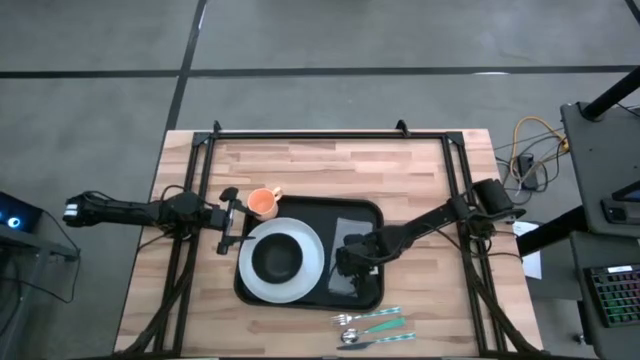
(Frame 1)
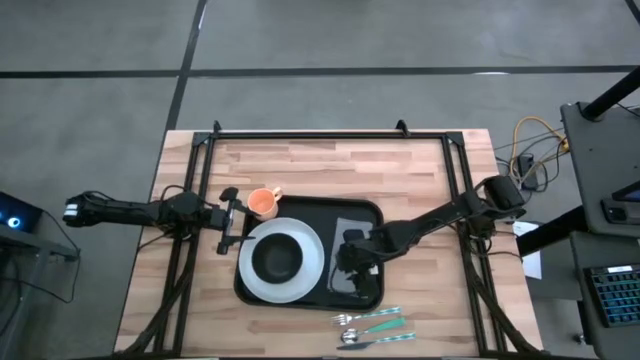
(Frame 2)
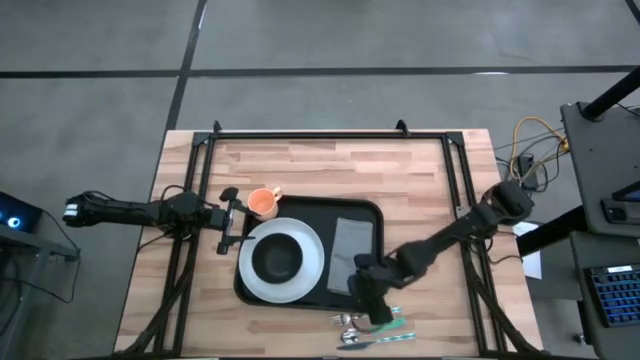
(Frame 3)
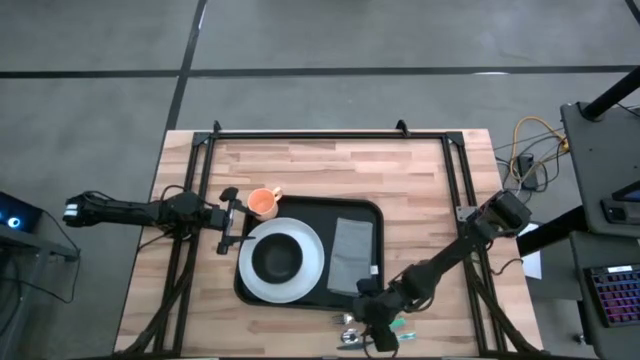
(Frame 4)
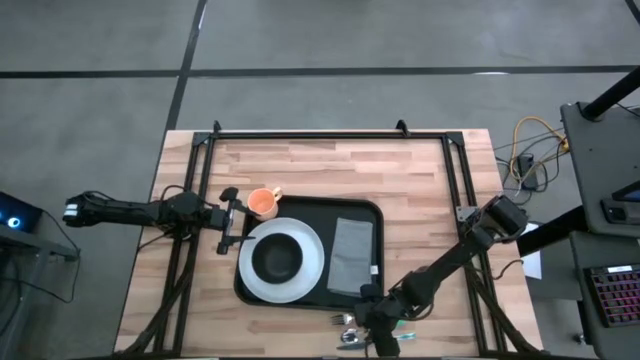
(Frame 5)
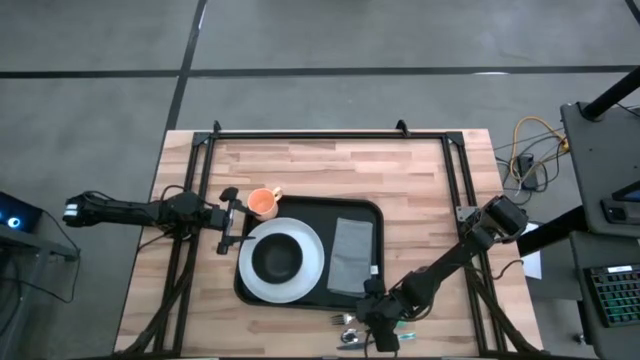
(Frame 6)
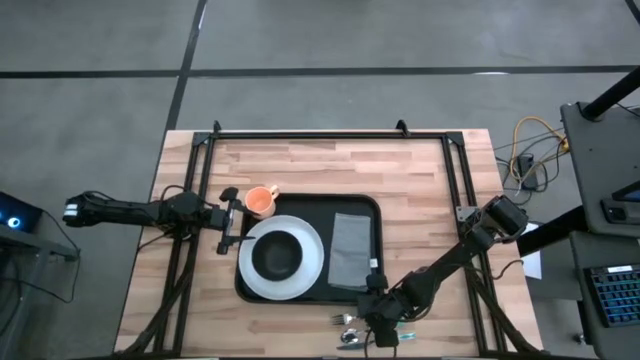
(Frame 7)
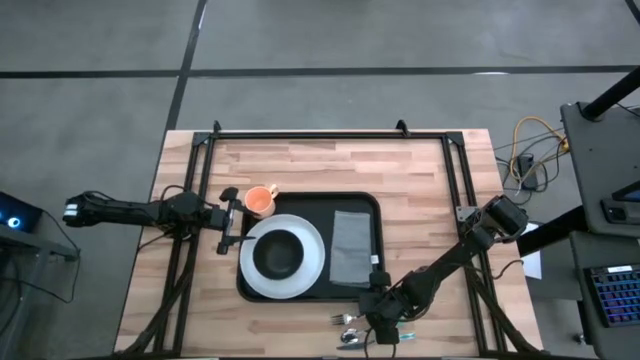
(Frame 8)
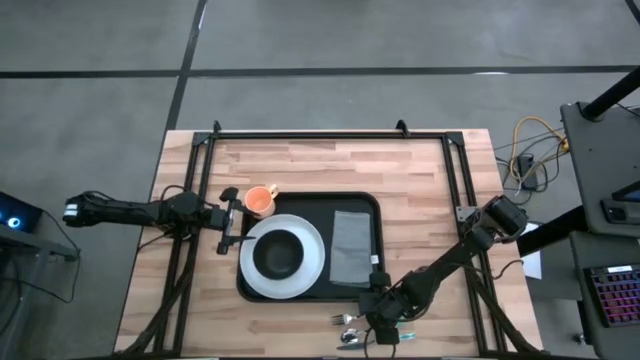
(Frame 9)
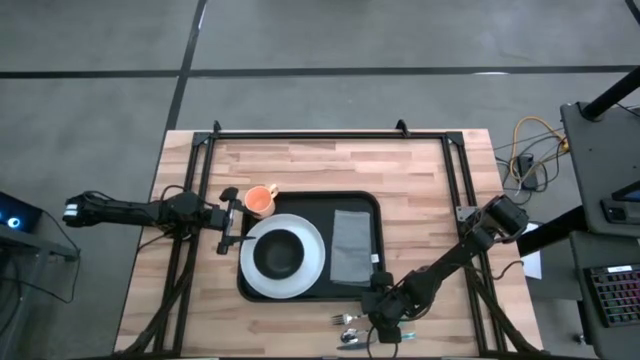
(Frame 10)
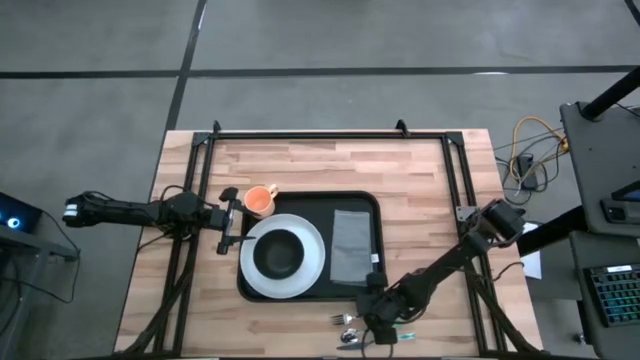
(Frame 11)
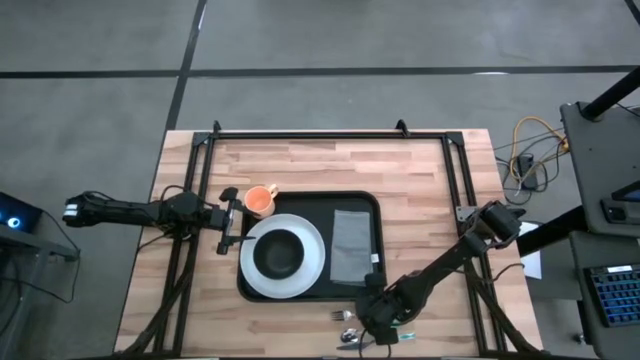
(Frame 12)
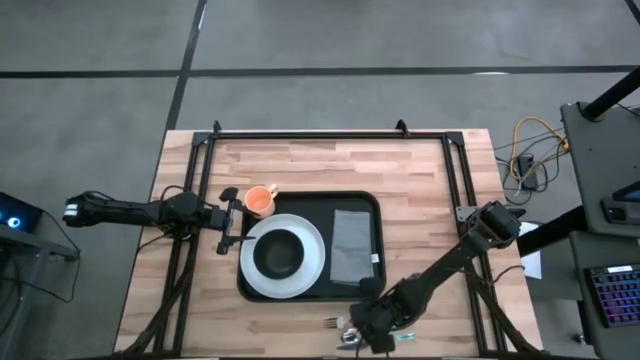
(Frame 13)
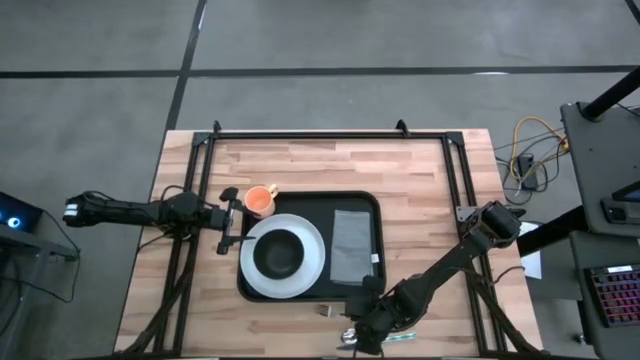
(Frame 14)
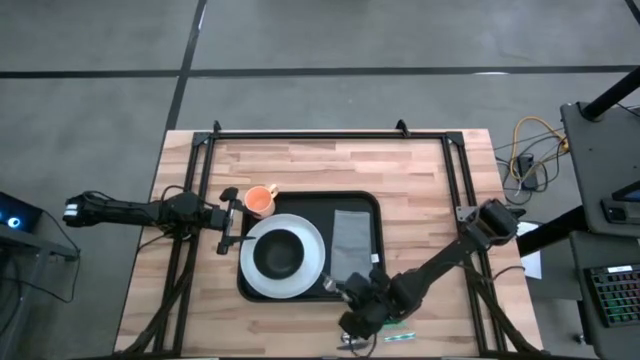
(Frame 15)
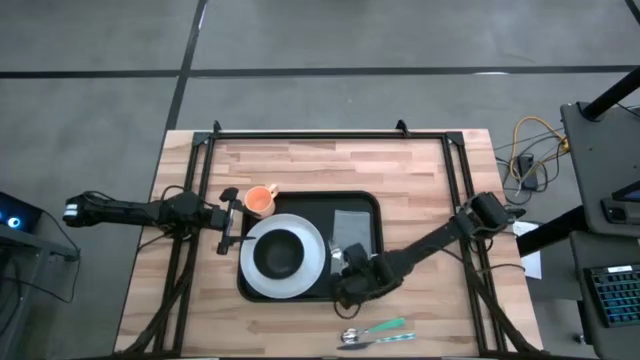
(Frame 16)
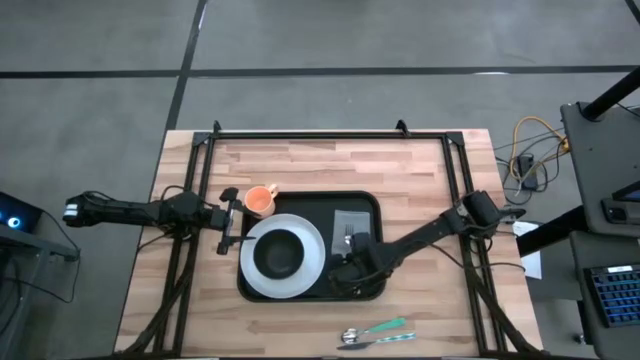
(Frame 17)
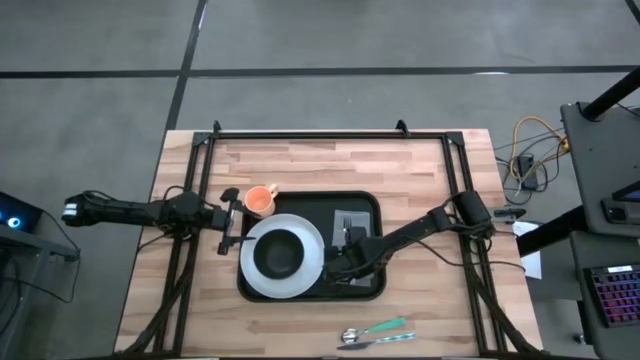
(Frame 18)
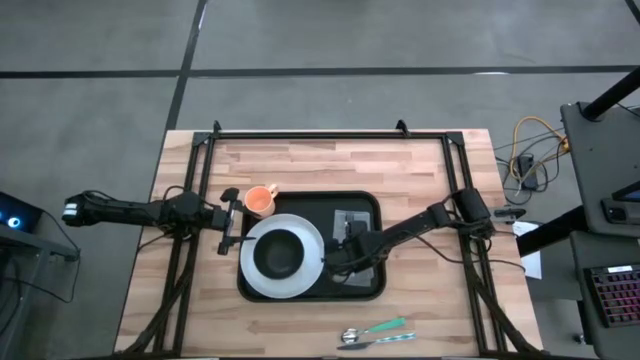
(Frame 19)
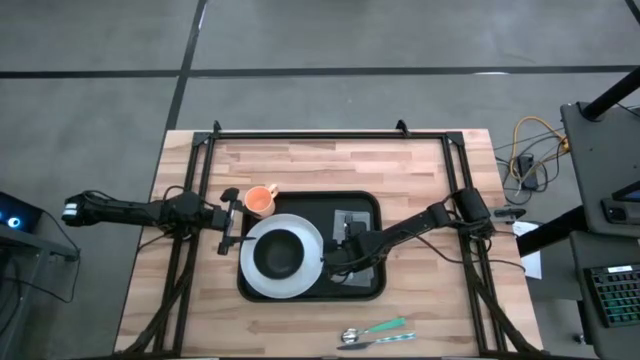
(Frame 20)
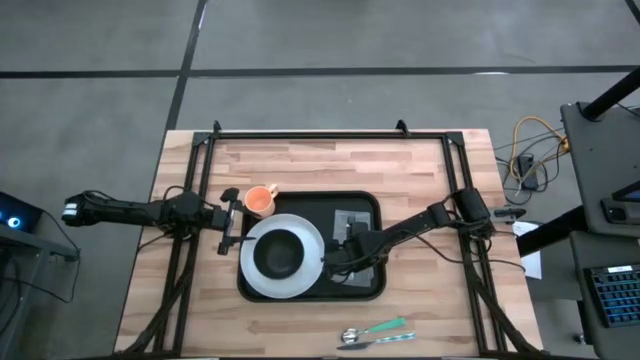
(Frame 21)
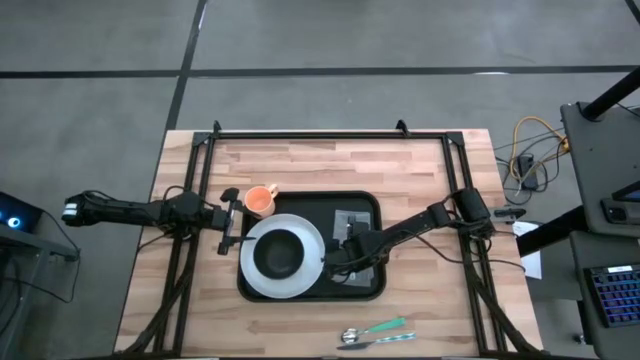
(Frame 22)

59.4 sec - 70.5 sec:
Task: Set up tray
Put the blue patterned fork on top of the gray napkin on the black tray

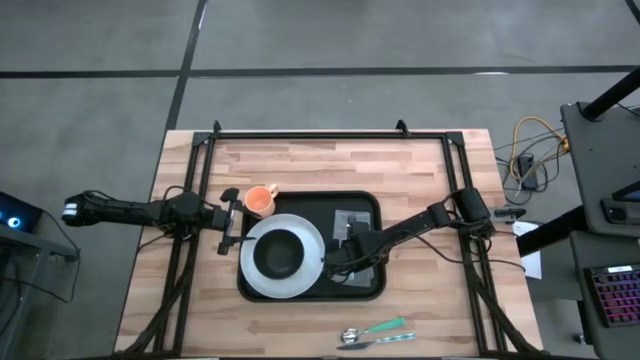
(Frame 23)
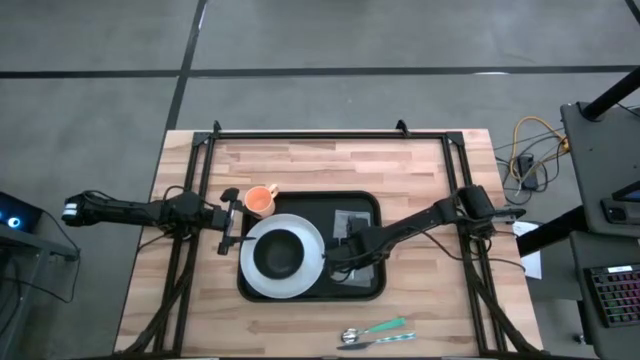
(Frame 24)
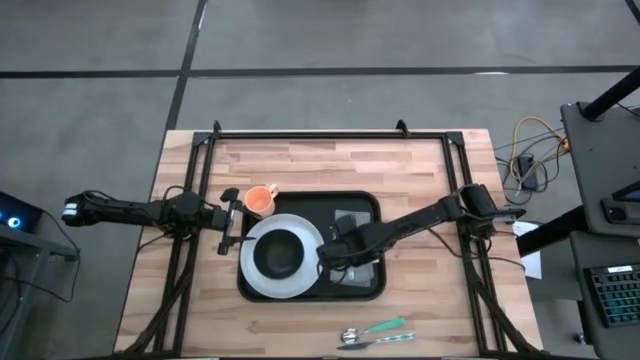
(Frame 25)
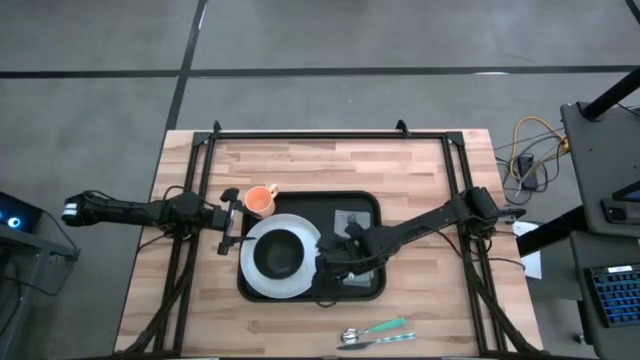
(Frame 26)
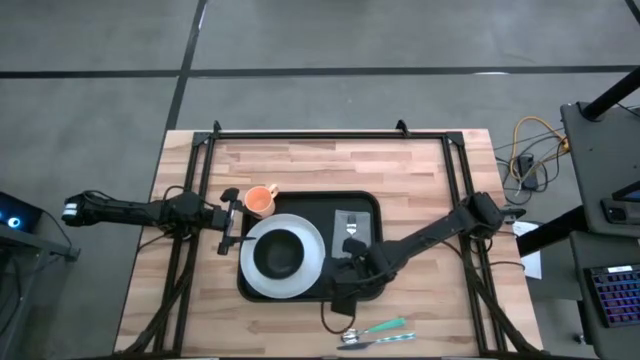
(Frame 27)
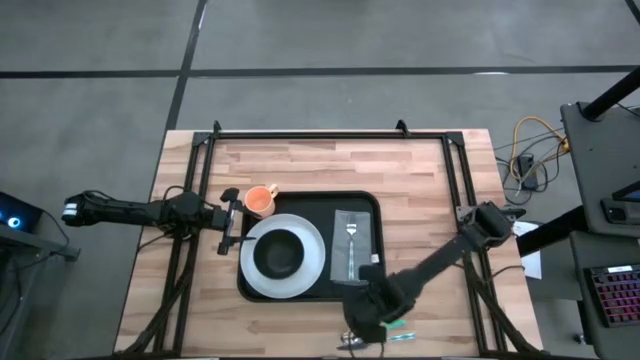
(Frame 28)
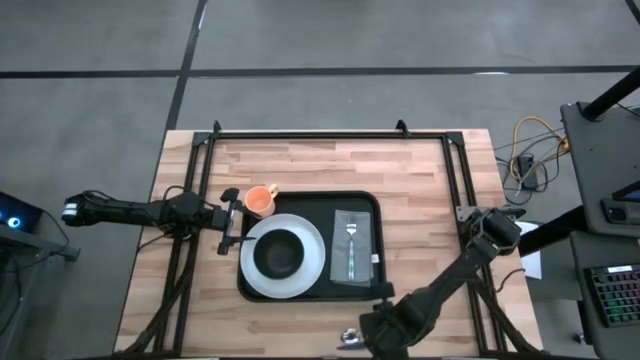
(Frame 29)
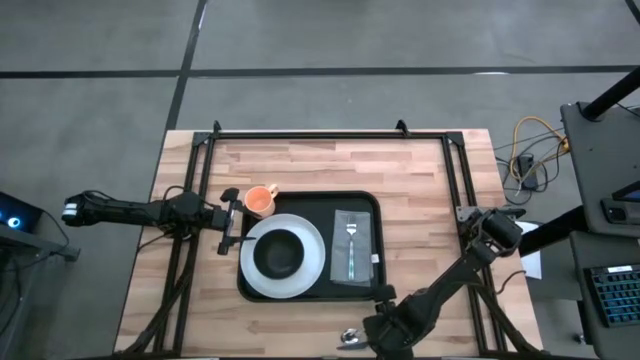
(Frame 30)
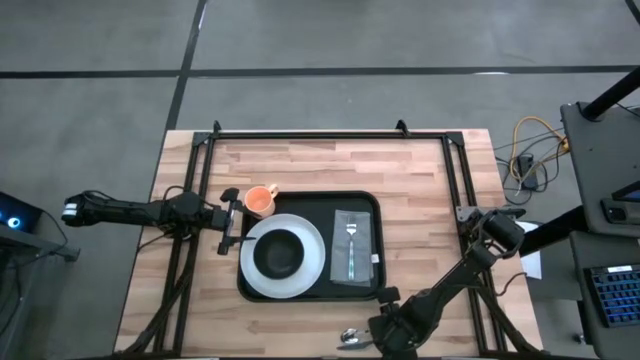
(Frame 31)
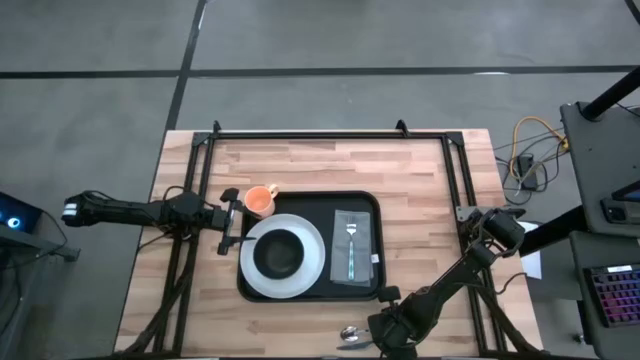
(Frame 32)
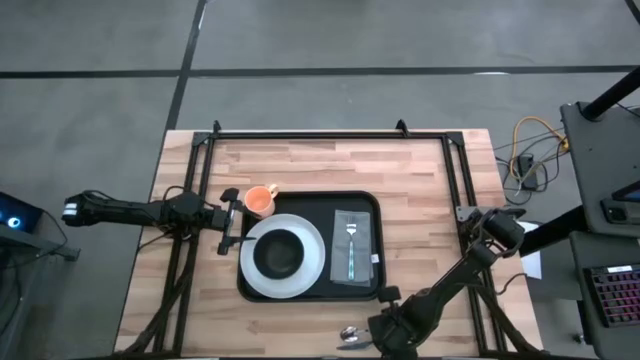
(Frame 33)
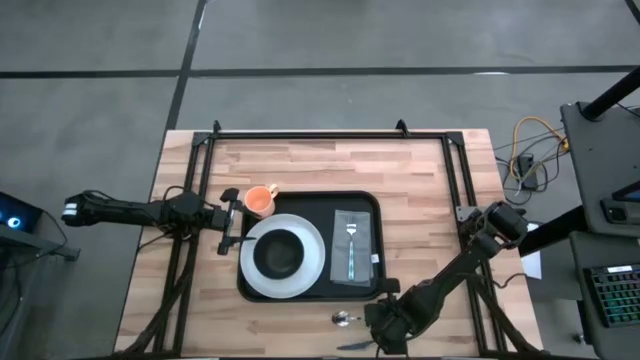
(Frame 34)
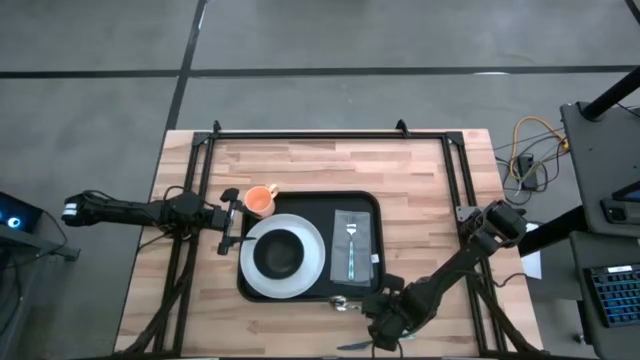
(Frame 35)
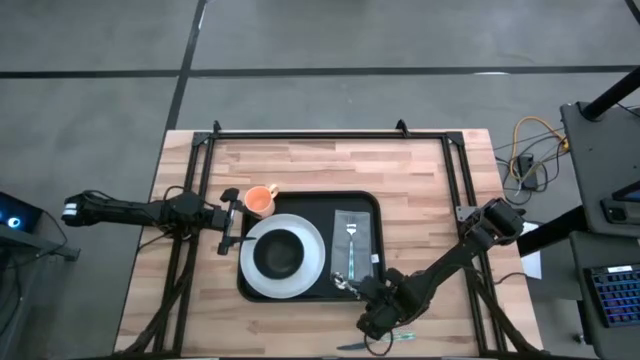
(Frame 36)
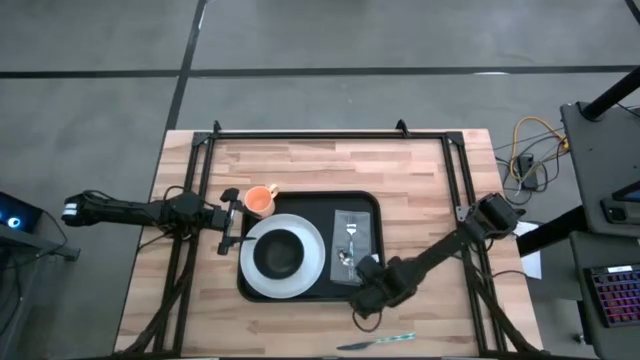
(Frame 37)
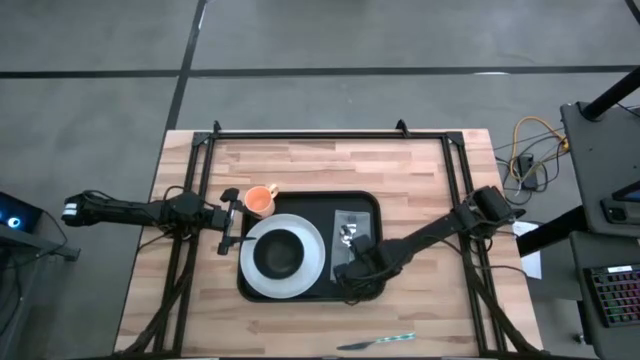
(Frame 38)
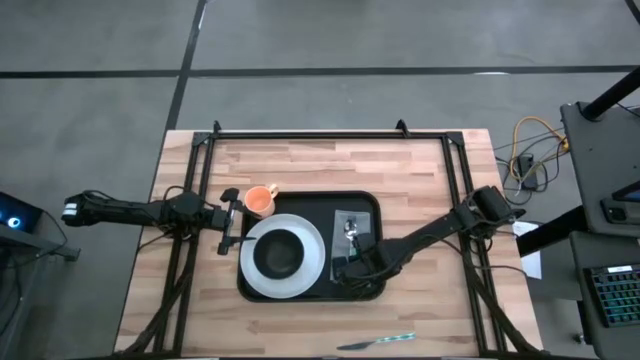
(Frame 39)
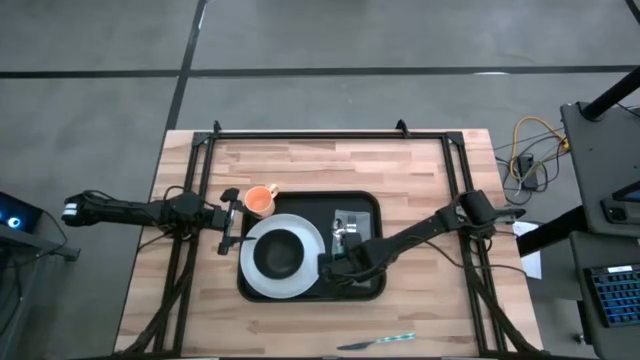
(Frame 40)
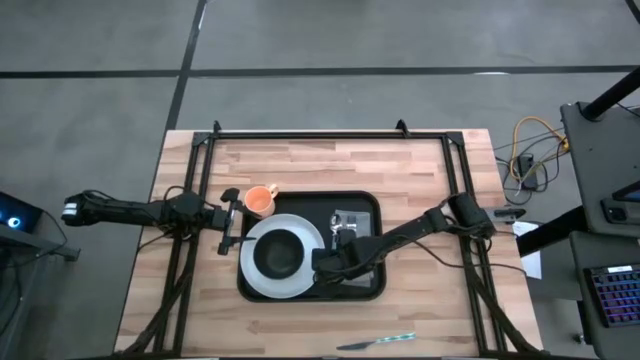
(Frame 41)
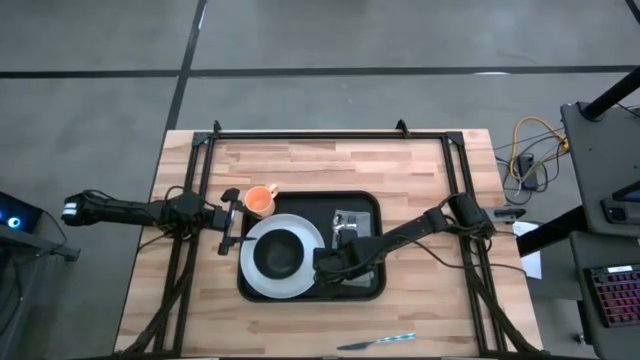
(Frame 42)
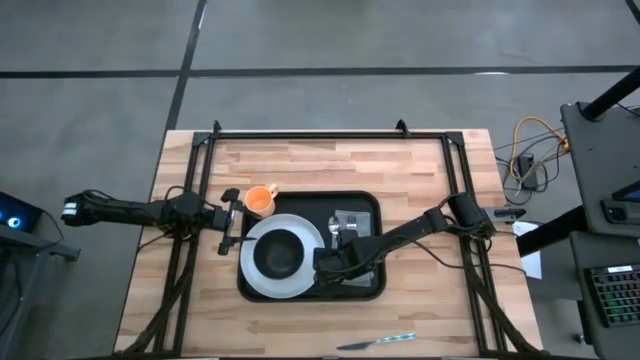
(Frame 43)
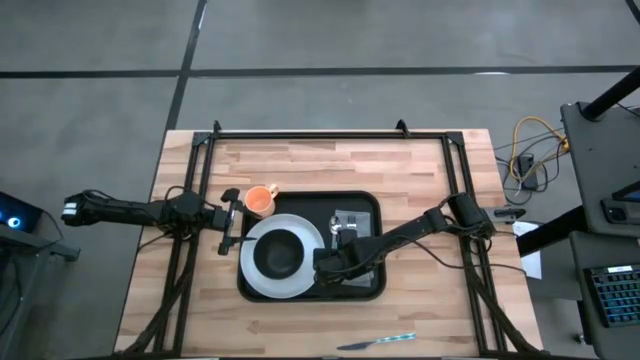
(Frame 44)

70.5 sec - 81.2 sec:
Put the blue spoon on the left side of the blue patterned fork of the gray napkin
